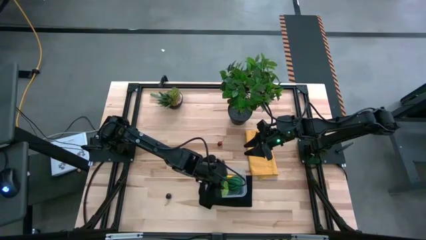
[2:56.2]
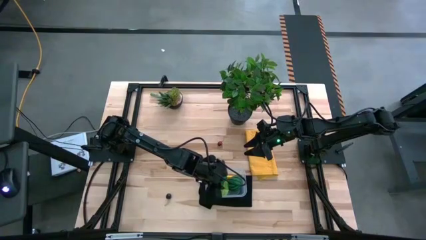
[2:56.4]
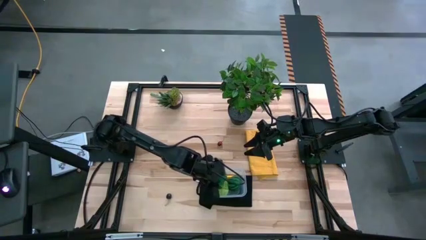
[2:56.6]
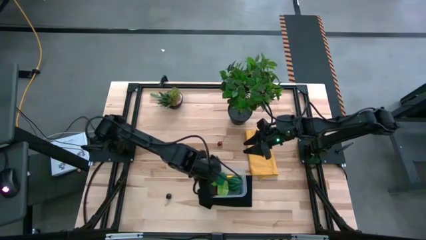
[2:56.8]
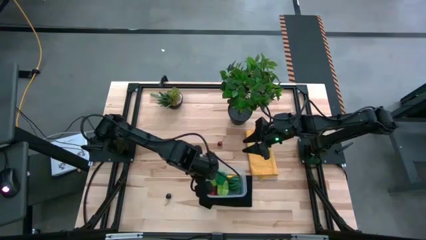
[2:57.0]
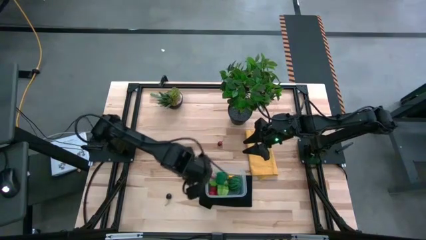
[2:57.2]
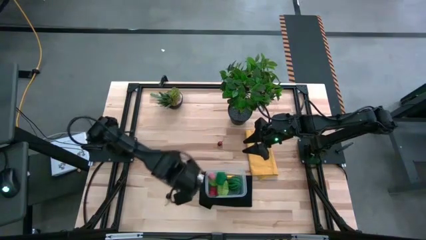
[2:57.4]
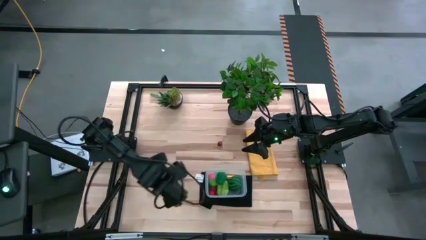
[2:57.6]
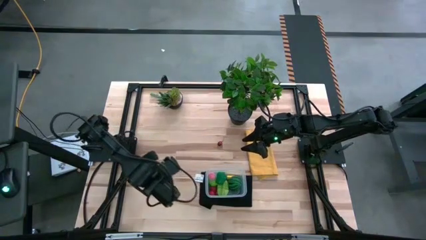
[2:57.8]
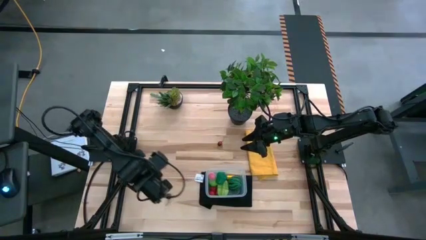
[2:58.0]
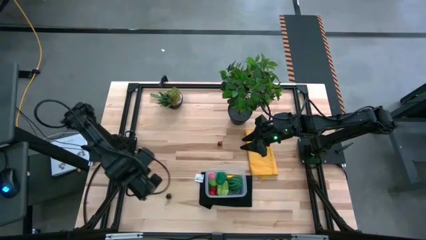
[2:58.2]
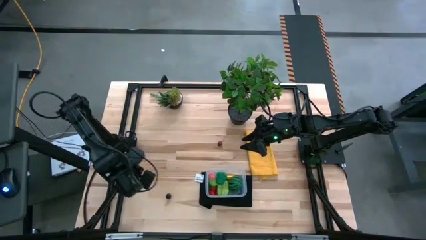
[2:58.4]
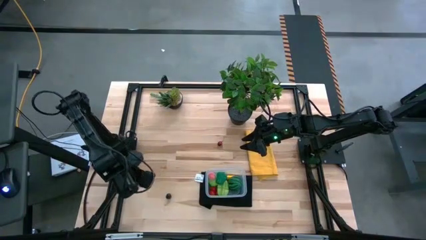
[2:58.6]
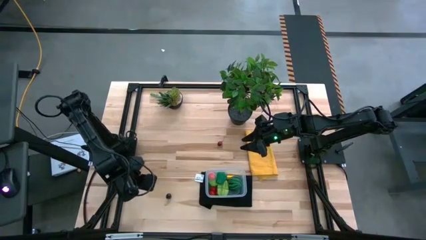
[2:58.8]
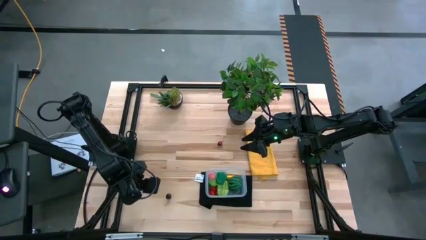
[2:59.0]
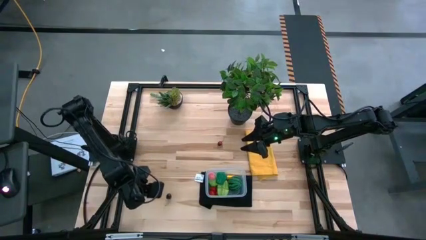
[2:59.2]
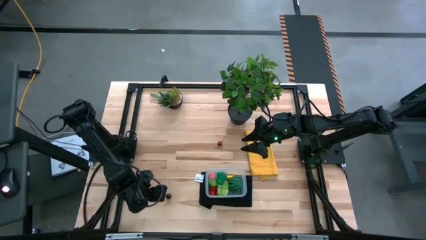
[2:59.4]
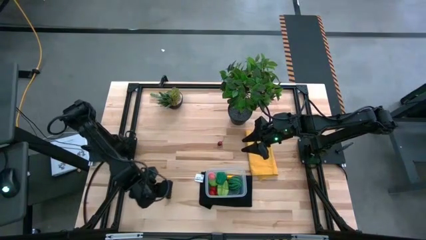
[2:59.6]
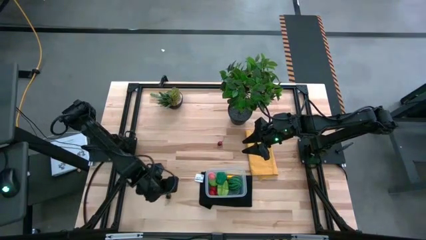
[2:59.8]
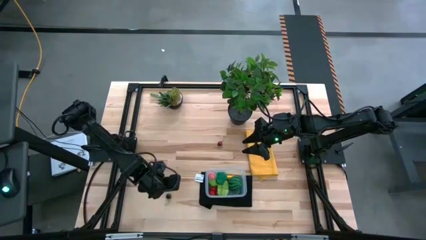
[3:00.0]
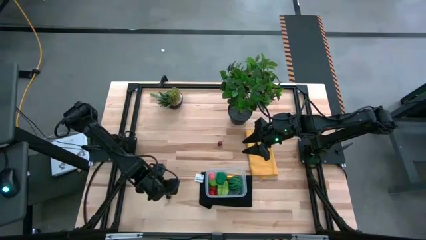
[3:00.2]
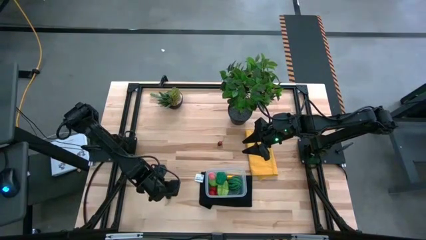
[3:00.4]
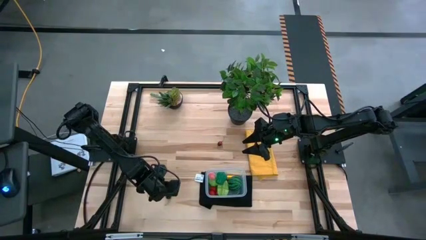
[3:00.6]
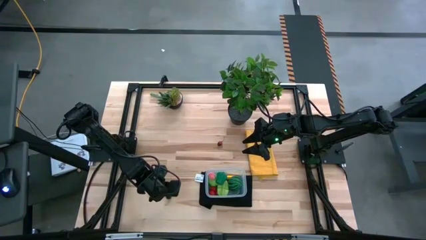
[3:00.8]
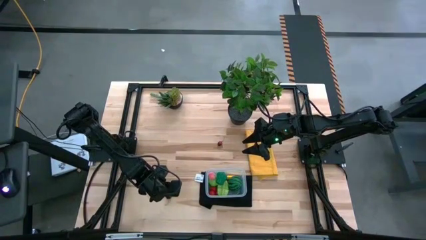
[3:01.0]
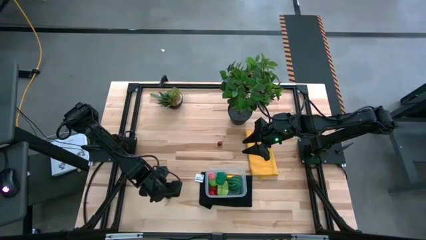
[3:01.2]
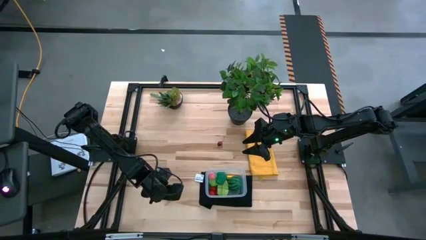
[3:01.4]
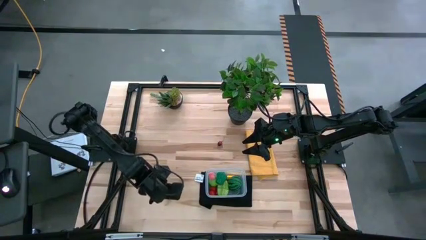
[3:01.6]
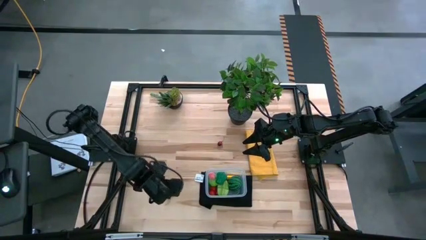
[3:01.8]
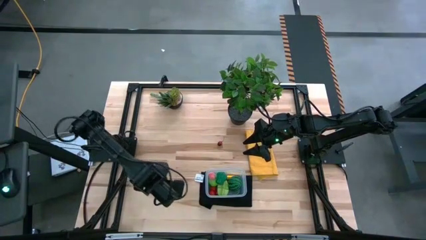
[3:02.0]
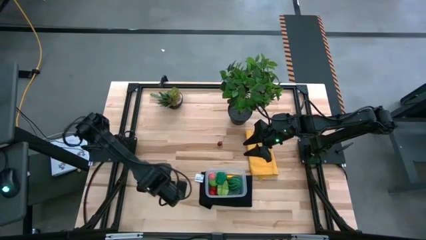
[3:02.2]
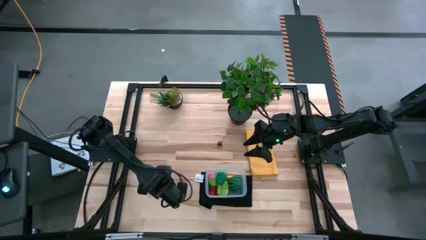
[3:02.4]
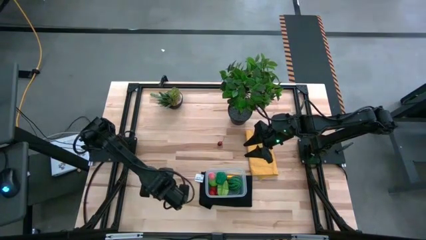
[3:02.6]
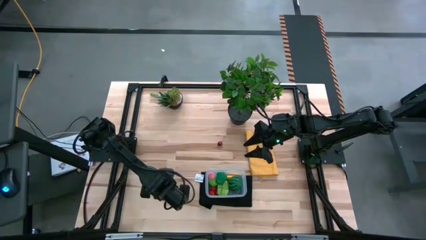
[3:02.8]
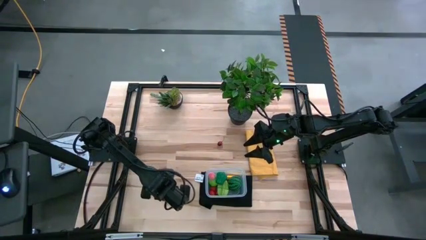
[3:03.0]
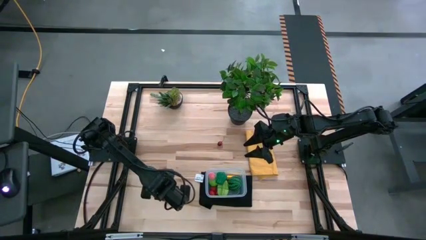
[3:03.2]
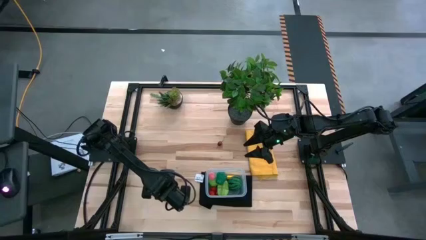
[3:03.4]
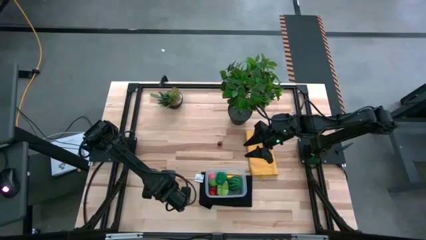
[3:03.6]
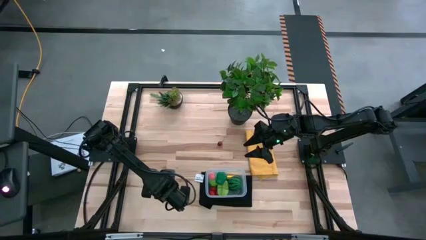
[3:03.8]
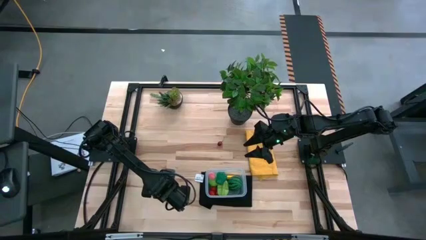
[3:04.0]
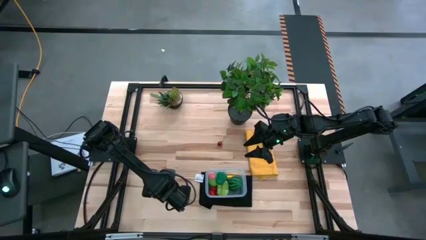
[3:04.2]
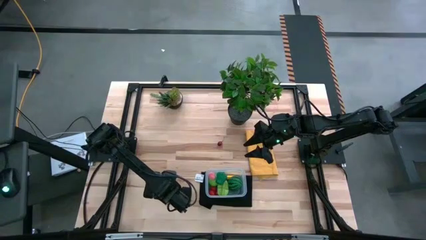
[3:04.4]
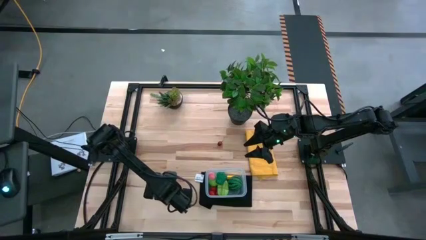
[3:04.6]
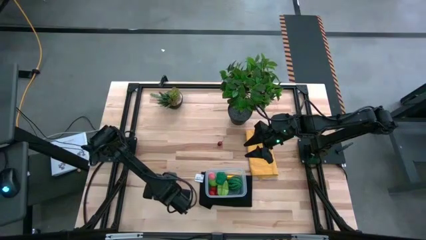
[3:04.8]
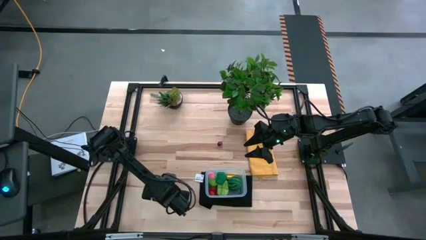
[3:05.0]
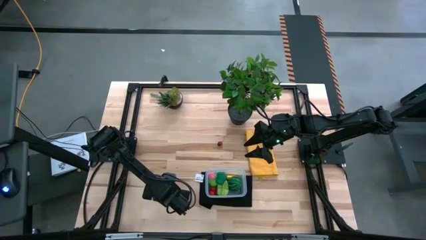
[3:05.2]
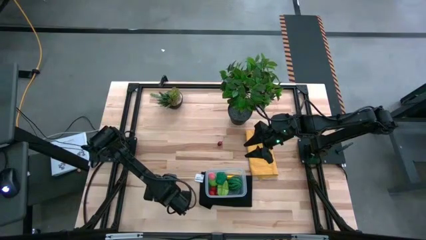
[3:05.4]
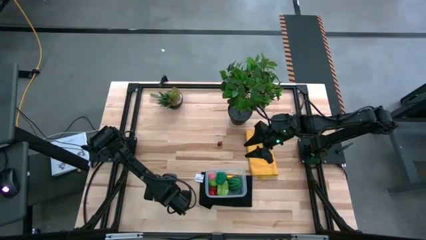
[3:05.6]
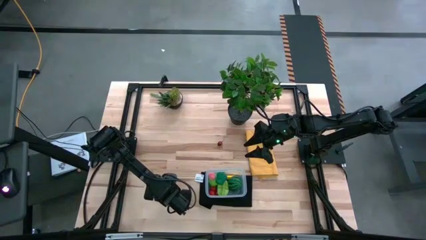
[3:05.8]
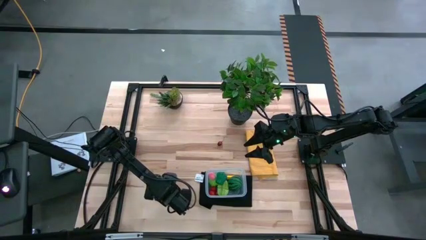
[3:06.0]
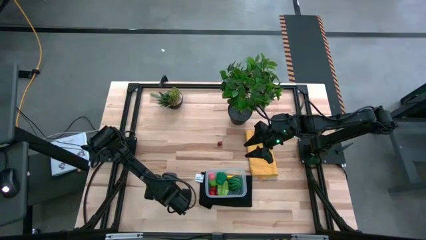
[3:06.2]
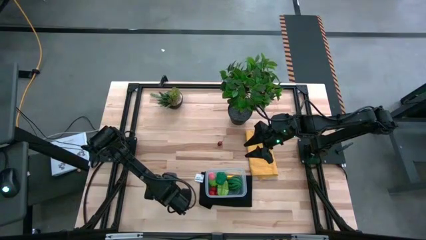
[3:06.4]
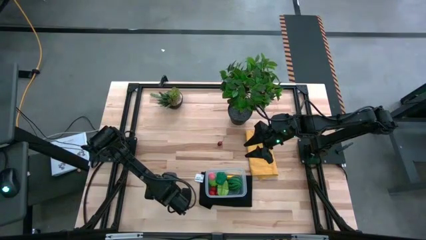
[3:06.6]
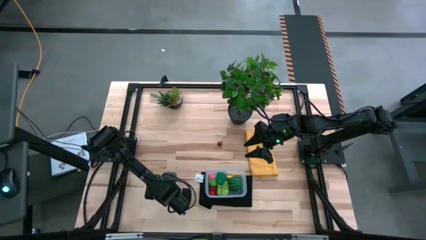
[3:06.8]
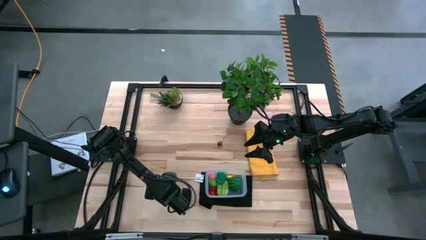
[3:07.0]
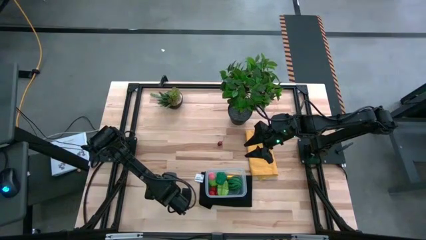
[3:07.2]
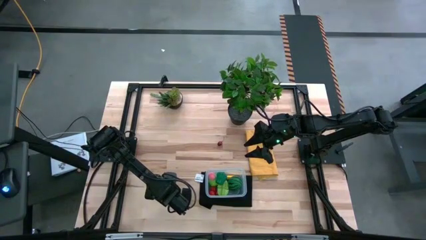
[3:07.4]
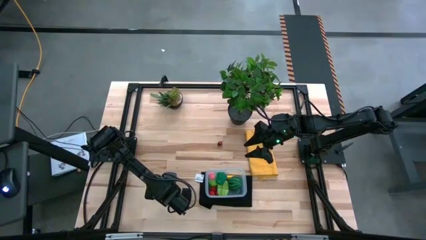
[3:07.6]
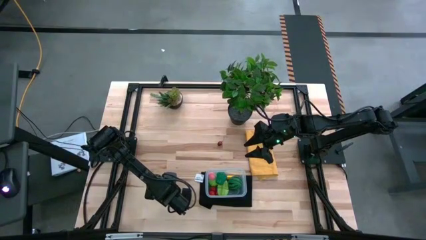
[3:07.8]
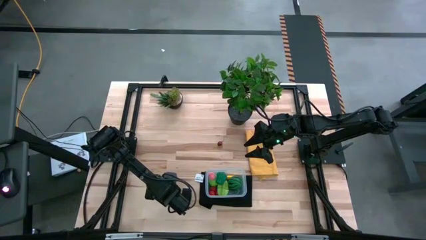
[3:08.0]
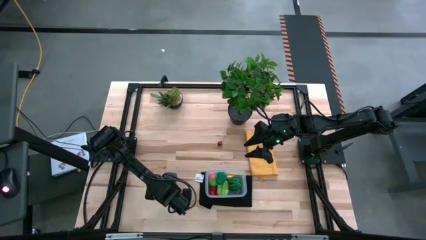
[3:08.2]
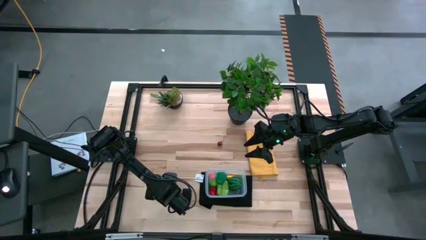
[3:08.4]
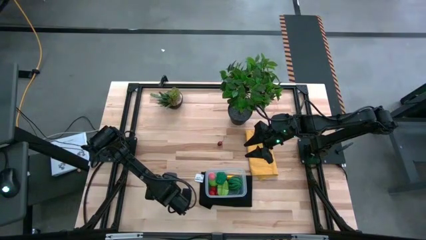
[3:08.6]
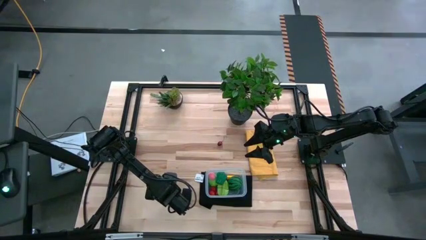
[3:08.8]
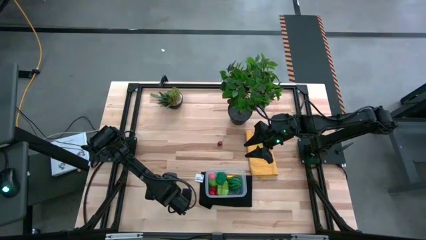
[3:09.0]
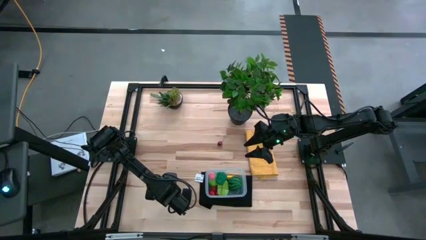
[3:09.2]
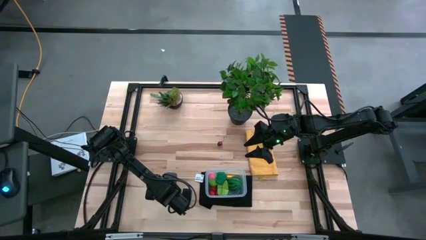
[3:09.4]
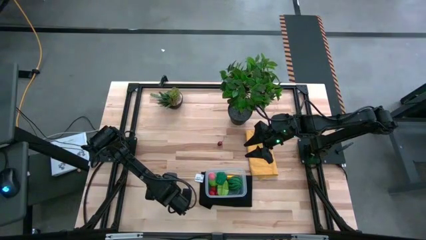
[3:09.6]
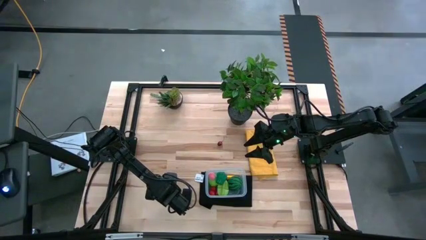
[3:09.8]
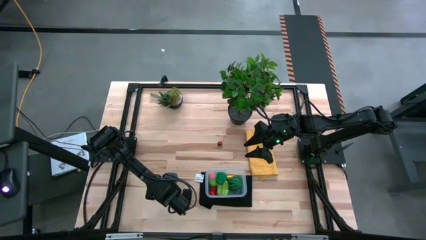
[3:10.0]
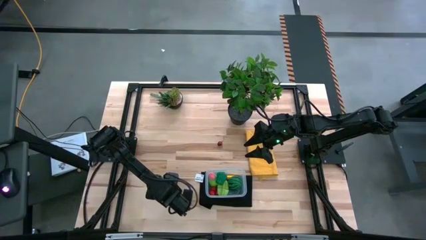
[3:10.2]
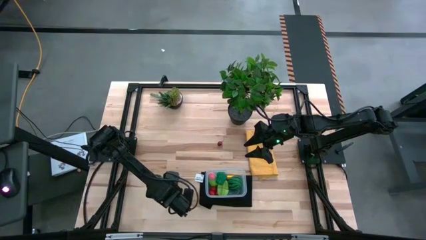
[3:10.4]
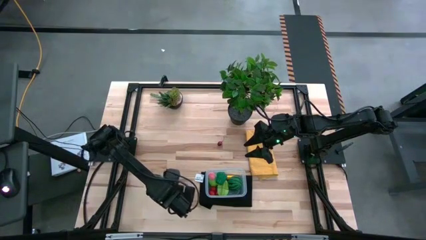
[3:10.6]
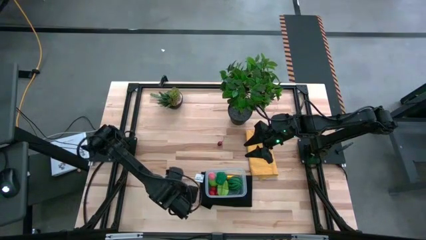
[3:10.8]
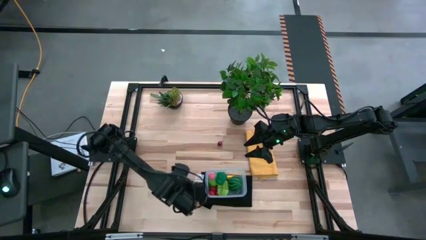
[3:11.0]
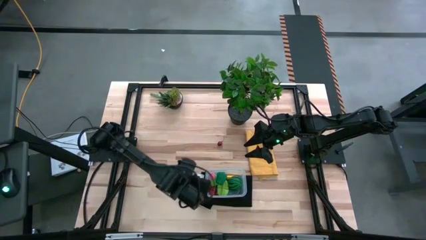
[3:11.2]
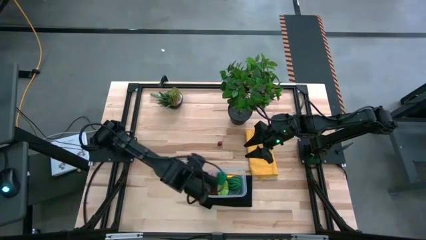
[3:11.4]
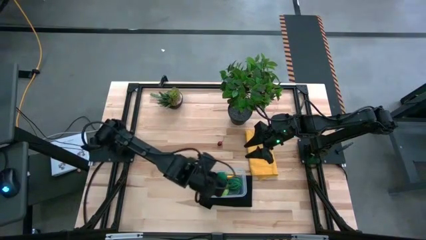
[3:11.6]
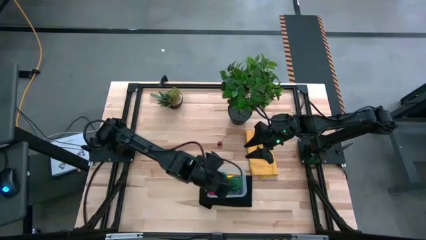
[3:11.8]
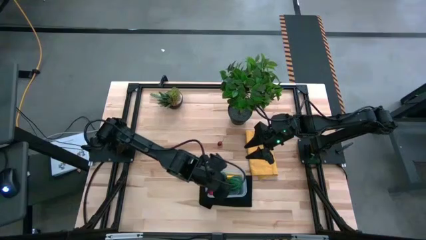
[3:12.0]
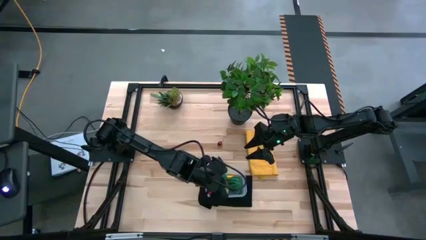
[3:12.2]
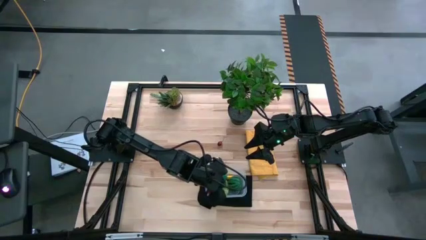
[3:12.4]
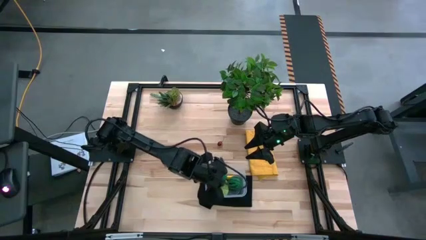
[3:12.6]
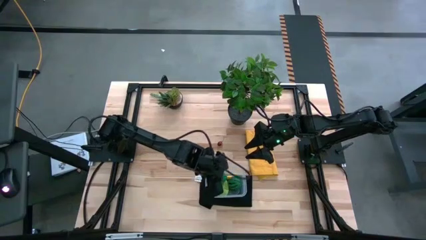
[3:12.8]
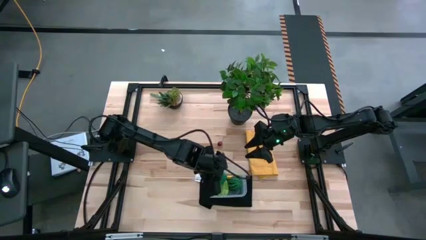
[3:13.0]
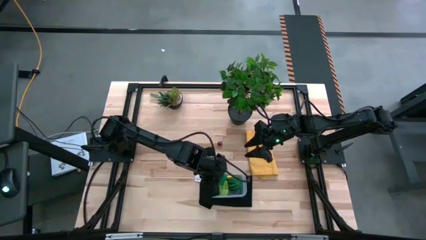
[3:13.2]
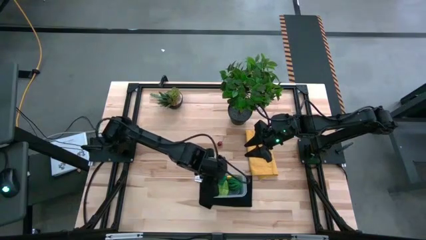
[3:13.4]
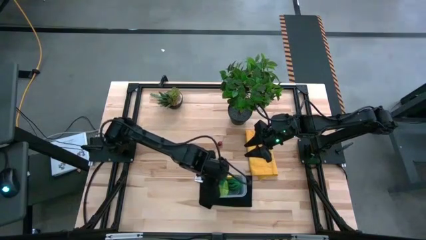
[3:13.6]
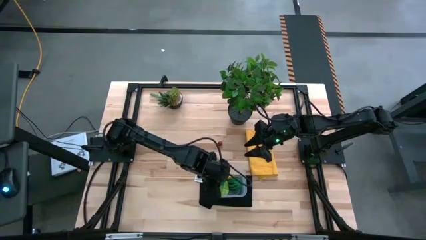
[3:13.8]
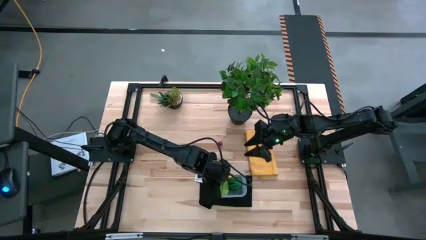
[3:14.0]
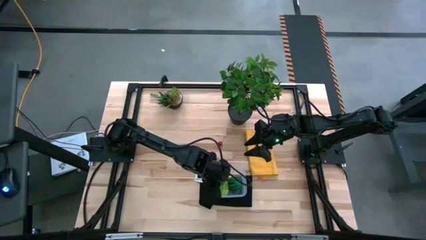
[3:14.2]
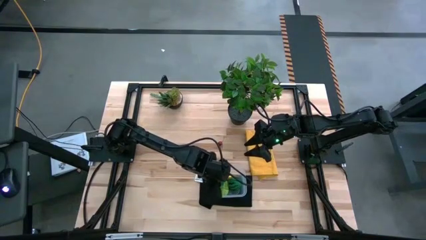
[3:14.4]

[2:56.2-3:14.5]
Task: Pick and placing Produce into tupperware
Put the black cherry into the transparent bin
